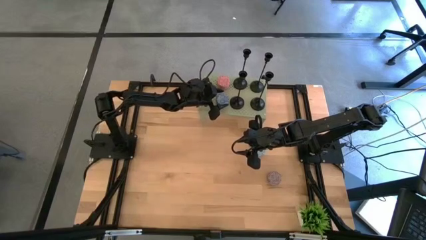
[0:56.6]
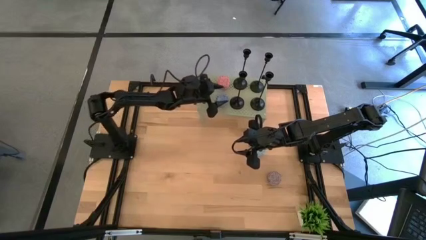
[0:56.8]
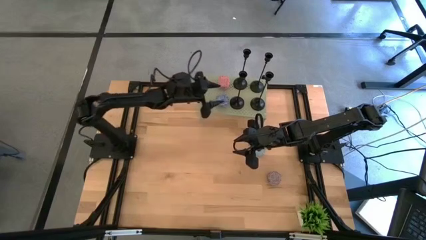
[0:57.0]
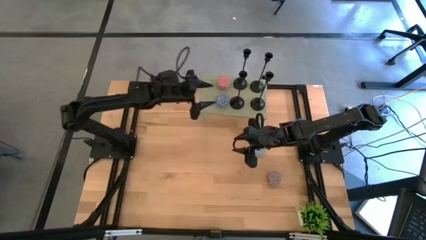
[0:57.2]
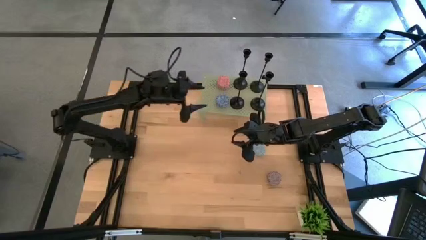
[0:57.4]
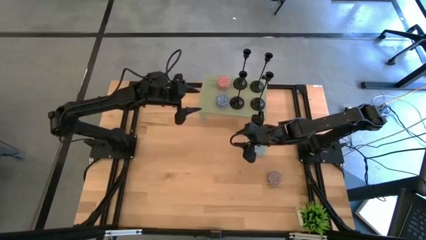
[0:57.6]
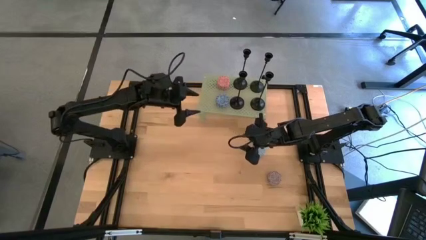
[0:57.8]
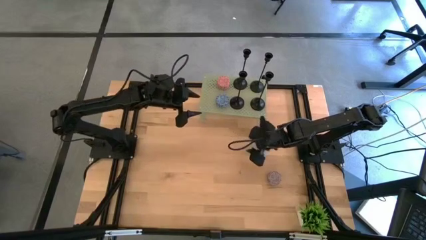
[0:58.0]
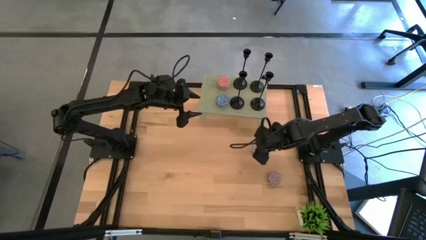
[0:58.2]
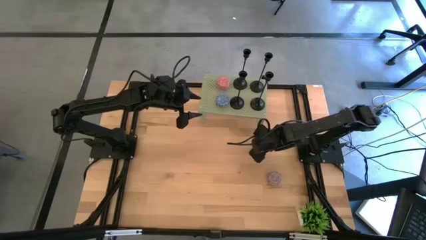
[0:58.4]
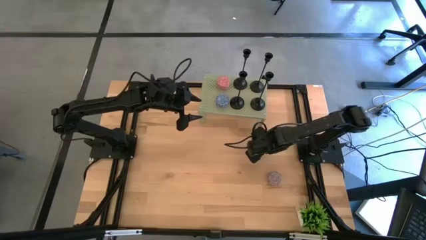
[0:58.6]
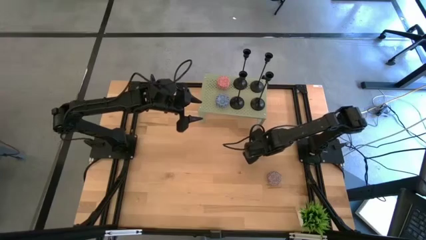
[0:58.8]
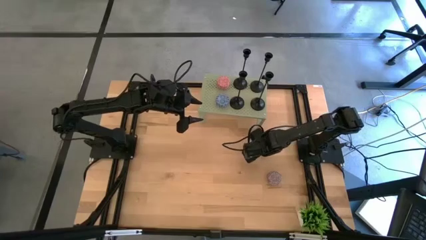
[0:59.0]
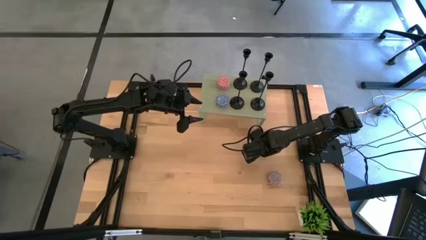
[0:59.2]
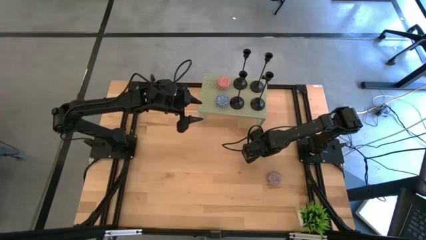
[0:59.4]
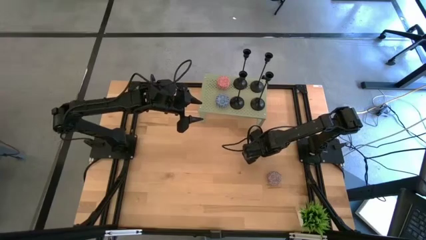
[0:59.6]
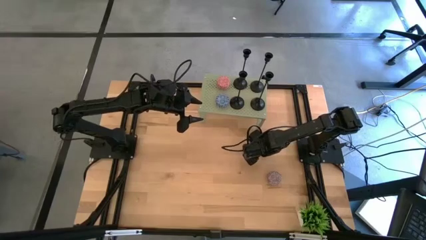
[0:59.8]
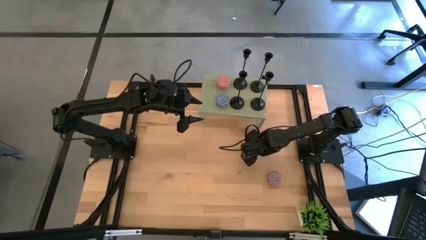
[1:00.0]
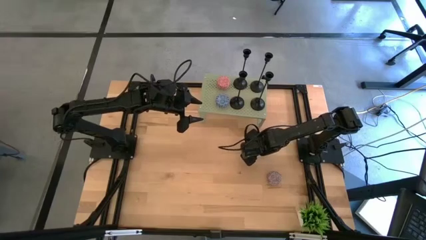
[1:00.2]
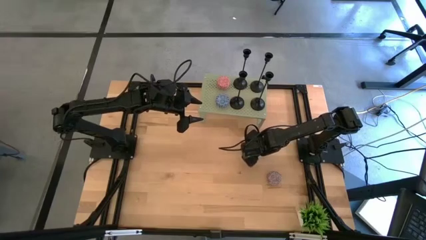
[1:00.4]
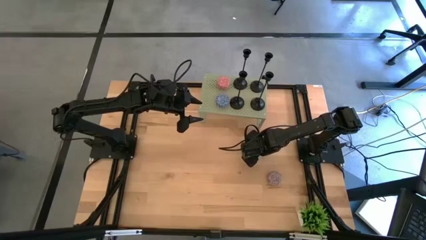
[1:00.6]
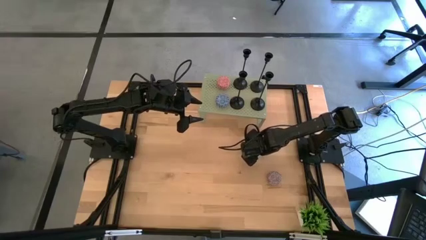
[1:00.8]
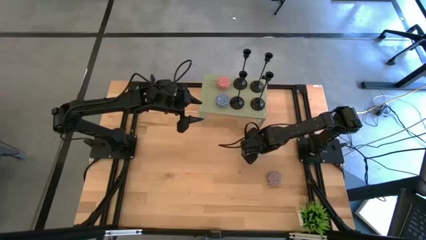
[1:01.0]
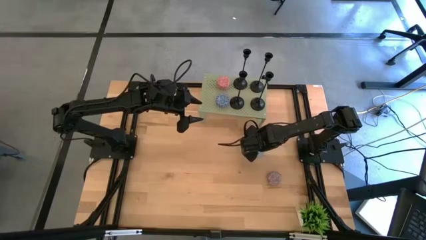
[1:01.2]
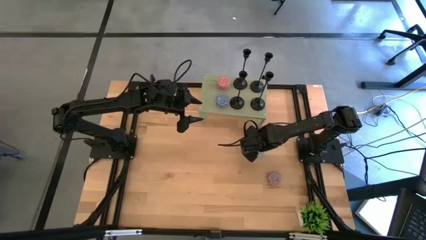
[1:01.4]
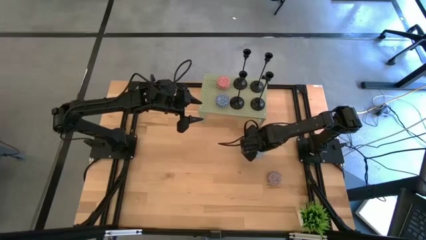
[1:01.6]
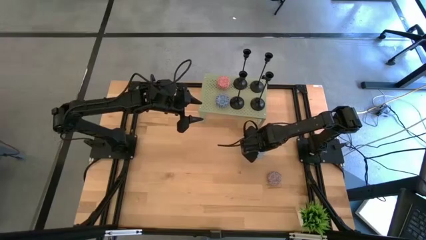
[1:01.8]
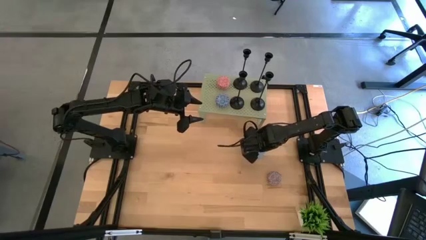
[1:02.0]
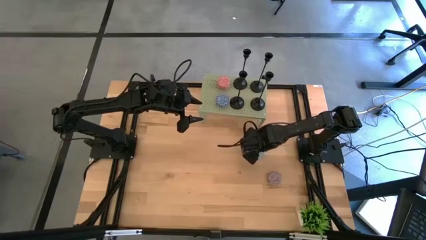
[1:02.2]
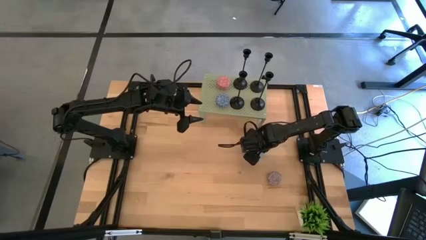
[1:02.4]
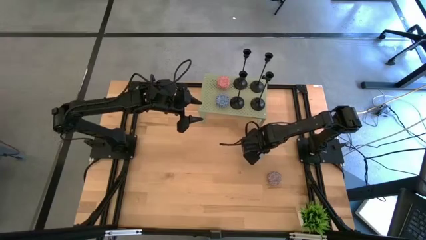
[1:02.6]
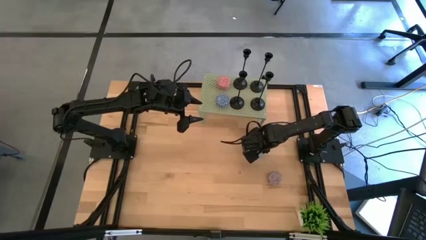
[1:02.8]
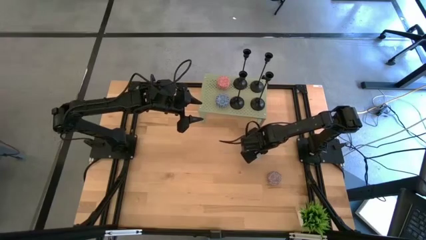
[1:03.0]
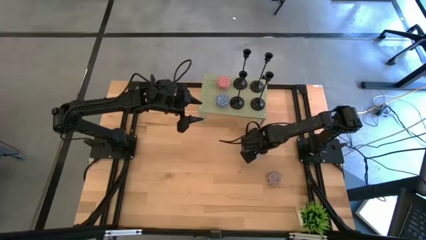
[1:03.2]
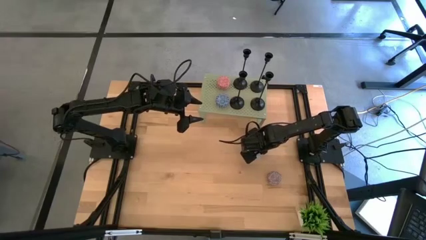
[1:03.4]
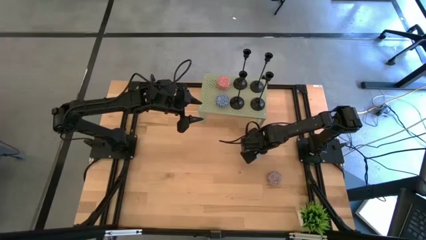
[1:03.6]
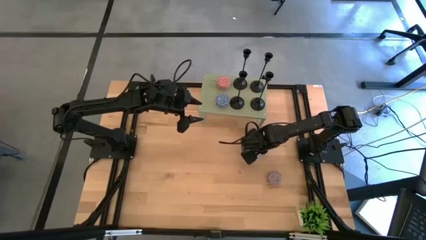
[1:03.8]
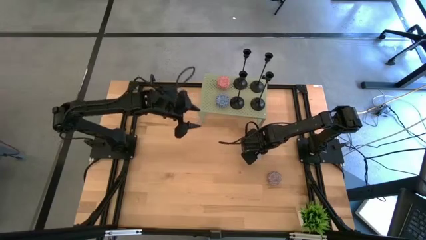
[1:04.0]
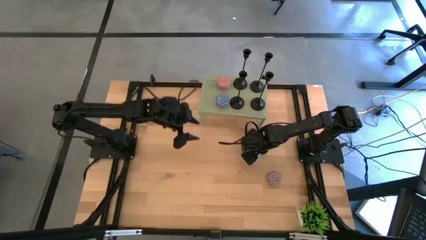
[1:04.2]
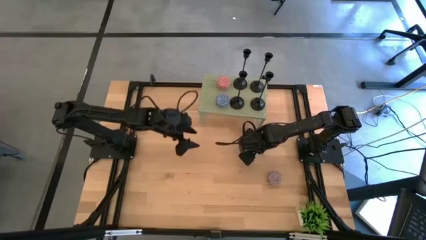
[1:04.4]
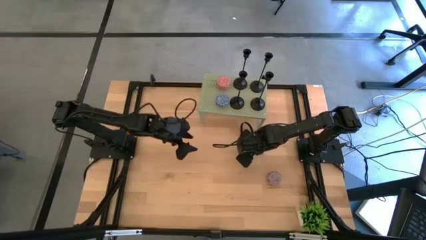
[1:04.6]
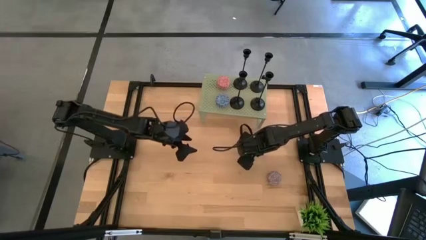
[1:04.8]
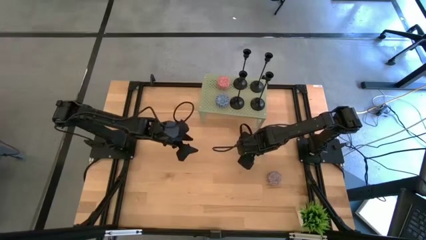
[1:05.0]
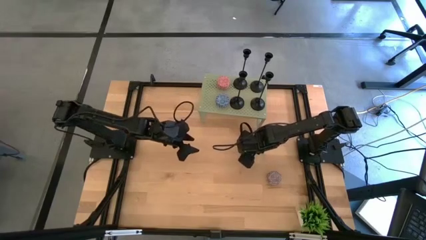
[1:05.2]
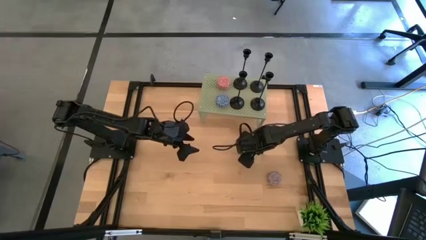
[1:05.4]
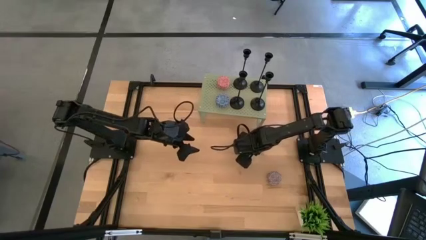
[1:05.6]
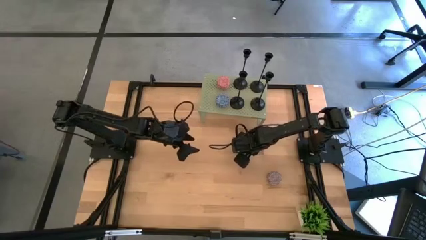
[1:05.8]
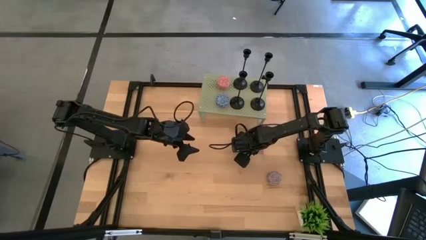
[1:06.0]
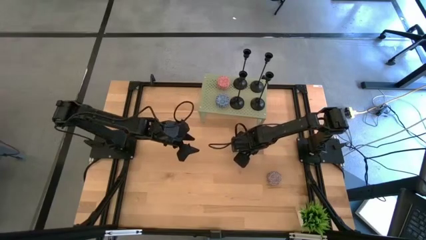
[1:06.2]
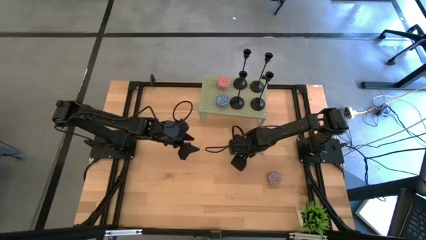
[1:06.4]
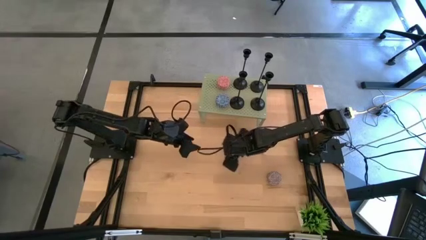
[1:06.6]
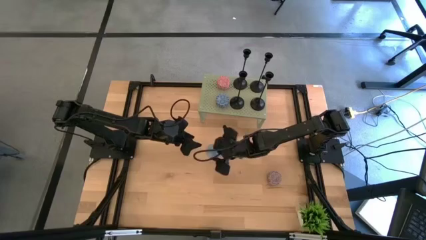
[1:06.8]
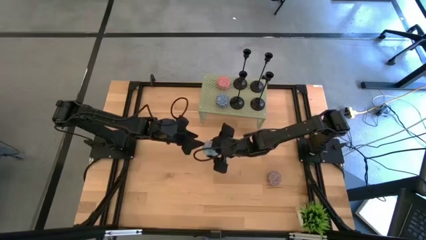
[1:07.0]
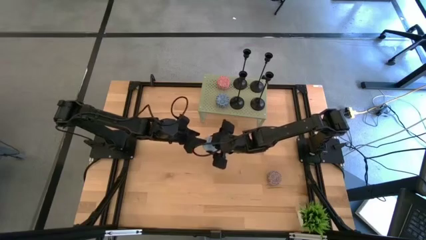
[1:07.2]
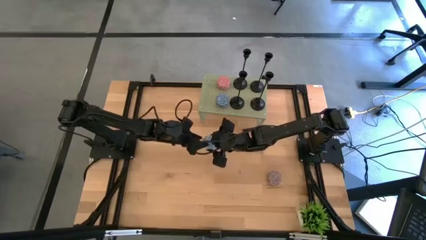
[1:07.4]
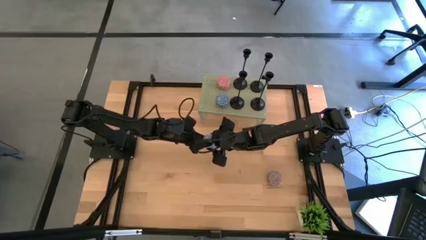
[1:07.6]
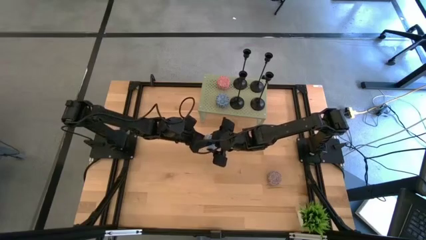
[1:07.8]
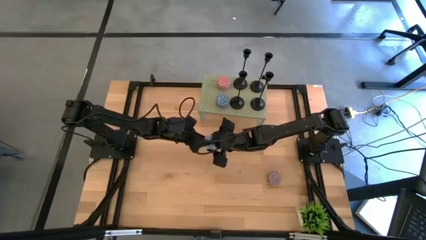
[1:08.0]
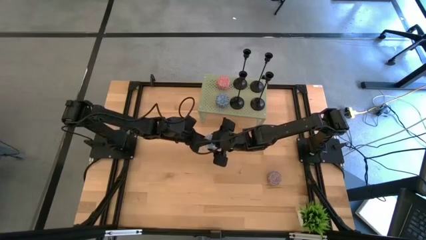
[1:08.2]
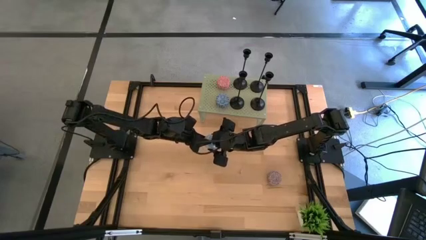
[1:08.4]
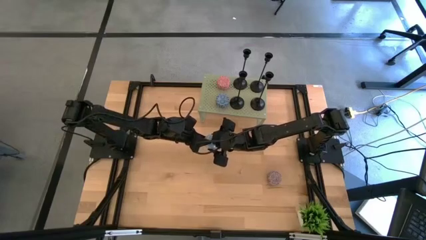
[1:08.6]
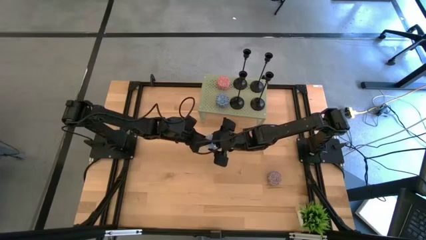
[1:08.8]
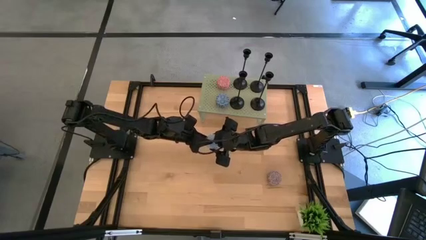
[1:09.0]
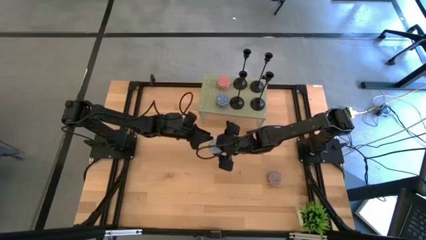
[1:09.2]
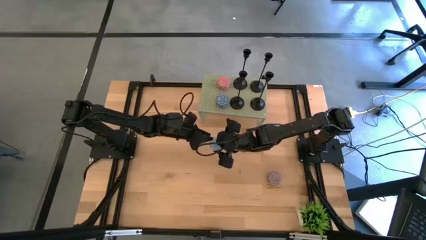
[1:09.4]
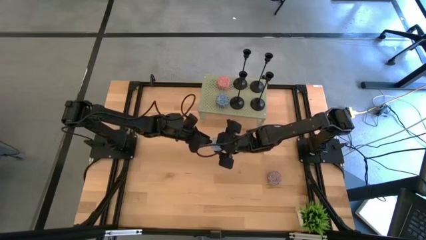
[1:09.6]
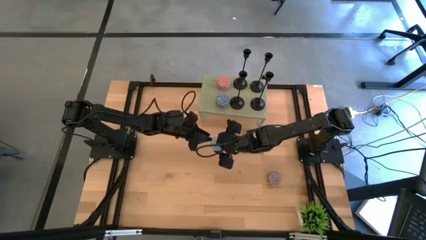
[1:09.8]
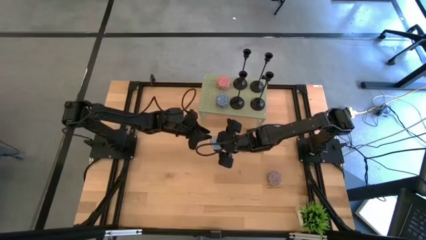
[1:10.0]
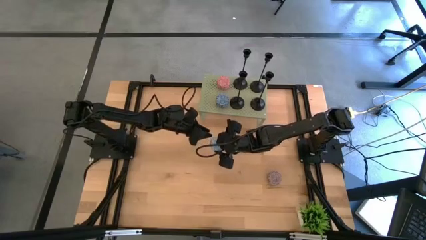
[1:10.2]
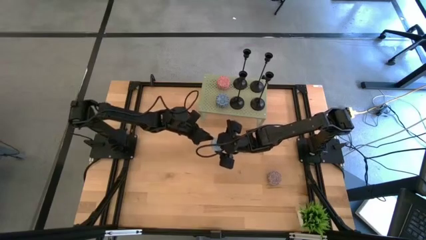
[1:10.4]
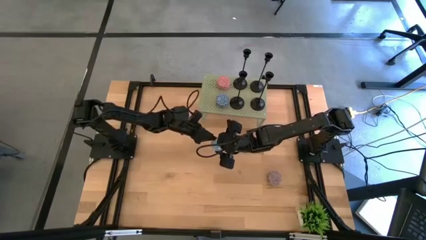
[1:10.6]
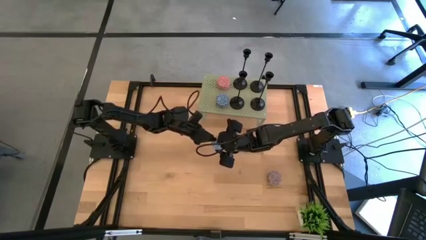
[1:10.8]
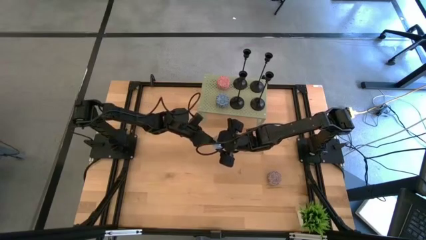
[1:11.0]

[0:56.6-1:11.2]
Task: Pick & Place candle stick holders
Put the blue scented candle on the shelf

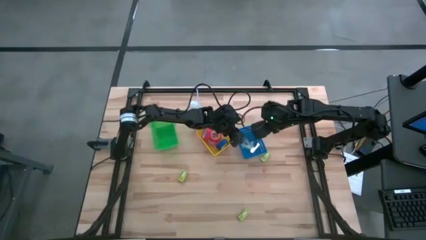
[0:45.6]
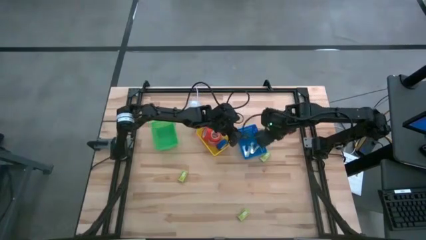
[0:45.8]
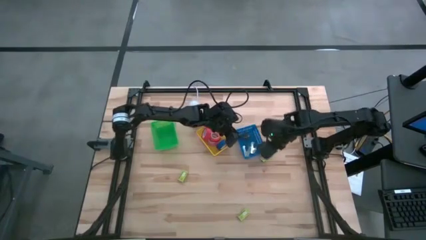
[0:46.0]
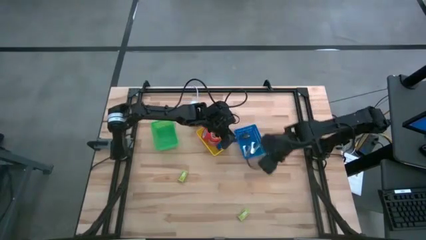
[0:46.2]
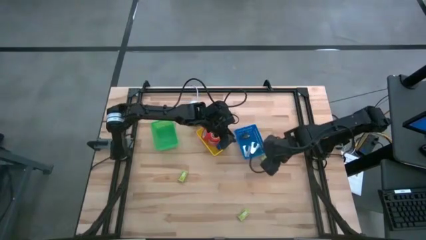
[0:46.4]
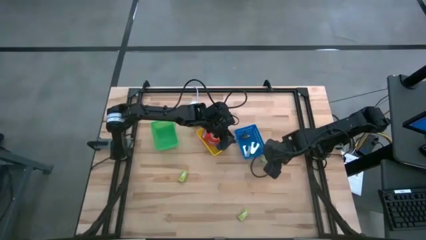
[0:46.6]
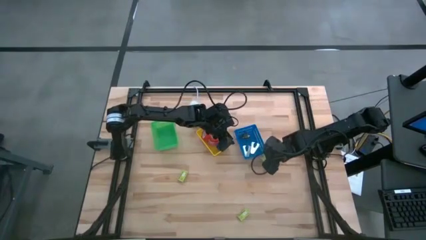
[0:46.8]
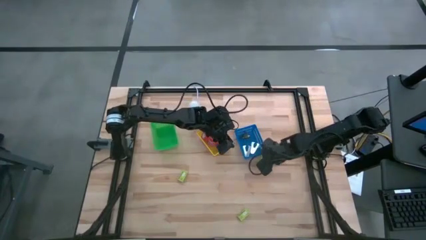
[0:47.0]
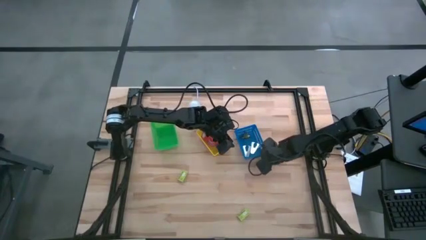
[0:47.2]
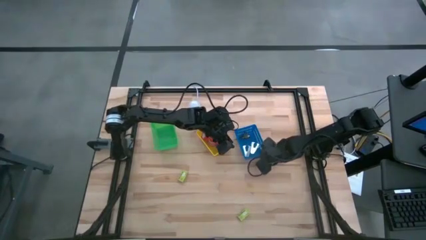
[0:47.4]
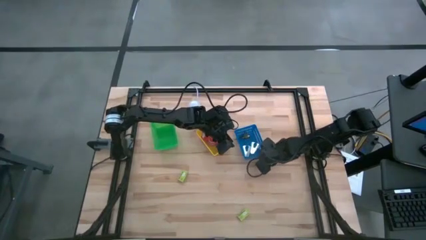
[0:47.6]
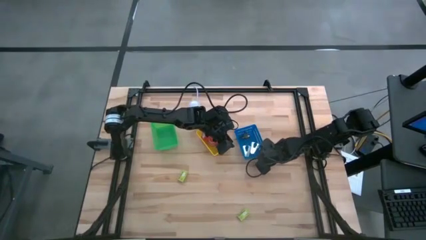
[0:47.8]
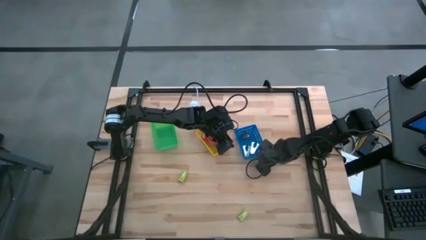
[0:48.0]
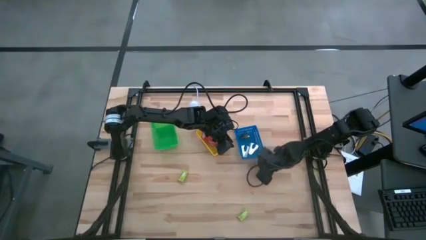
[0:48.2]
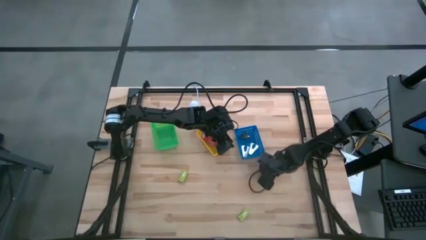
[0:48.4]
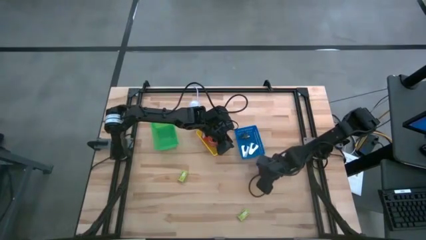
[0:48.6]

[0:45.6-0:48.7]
Task: Pick and place Stapler, Stapler remover, tape
Put the top right staple box into the green basket
